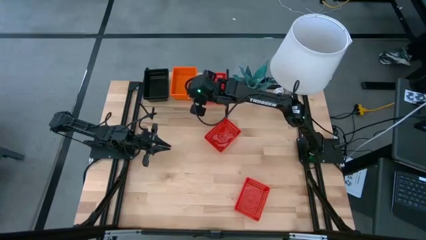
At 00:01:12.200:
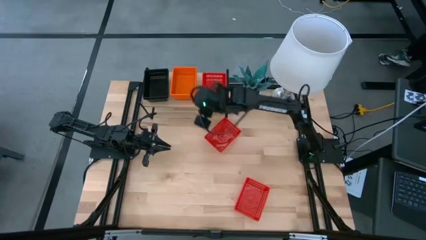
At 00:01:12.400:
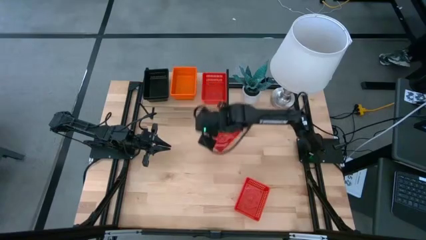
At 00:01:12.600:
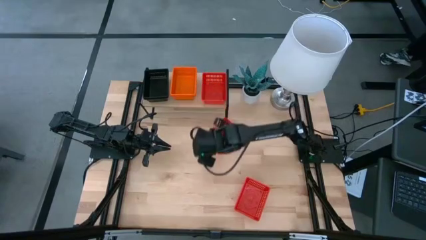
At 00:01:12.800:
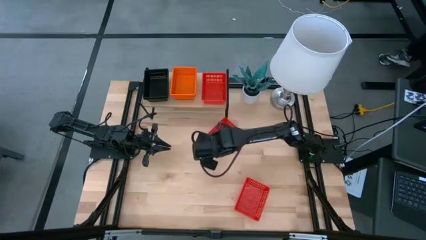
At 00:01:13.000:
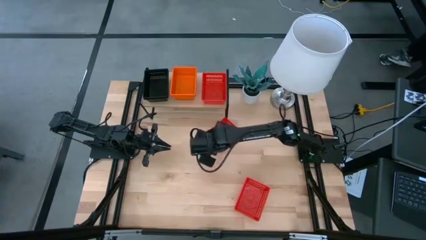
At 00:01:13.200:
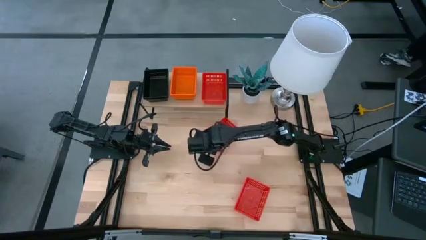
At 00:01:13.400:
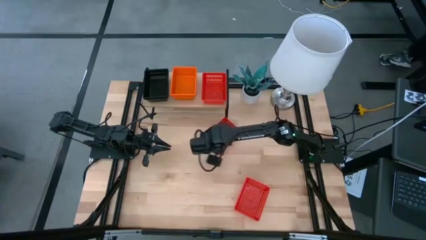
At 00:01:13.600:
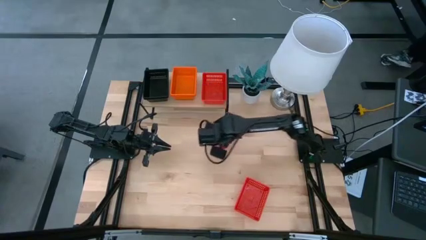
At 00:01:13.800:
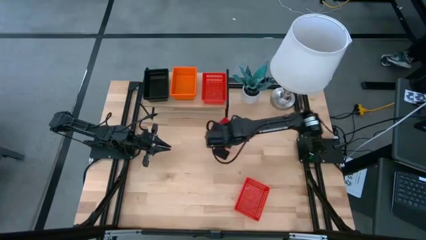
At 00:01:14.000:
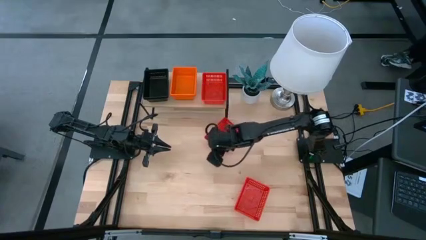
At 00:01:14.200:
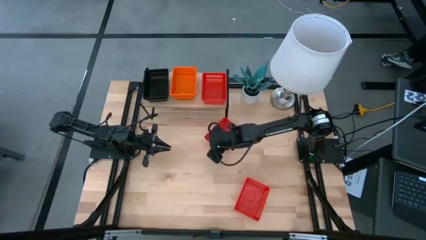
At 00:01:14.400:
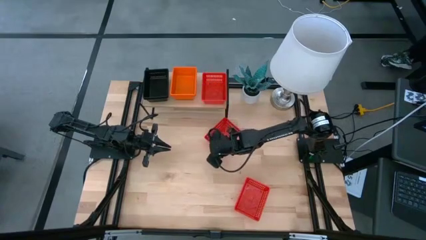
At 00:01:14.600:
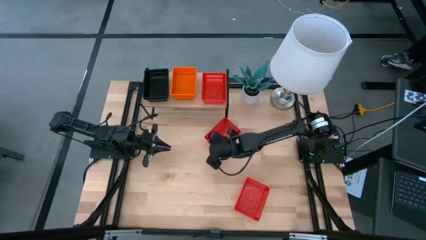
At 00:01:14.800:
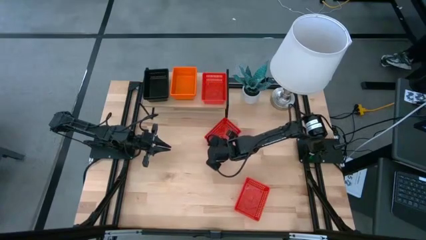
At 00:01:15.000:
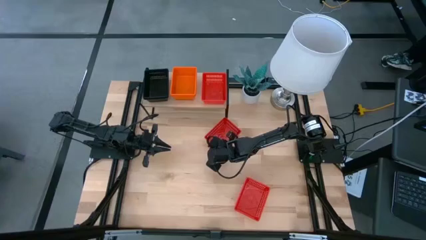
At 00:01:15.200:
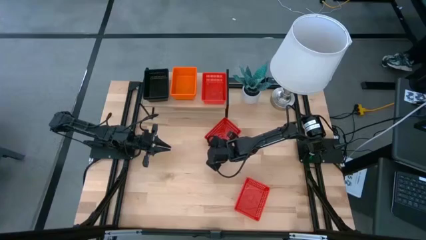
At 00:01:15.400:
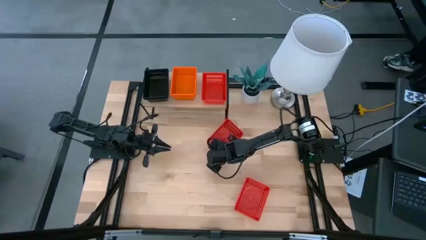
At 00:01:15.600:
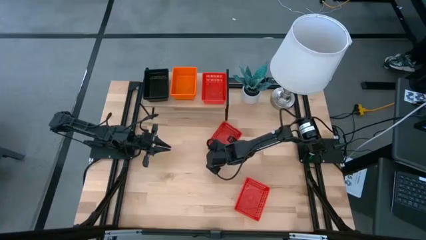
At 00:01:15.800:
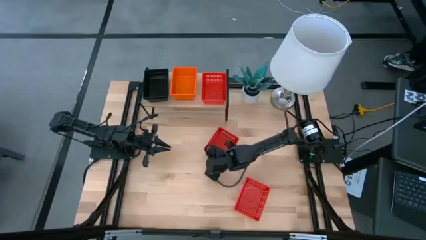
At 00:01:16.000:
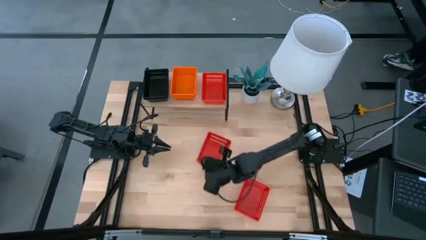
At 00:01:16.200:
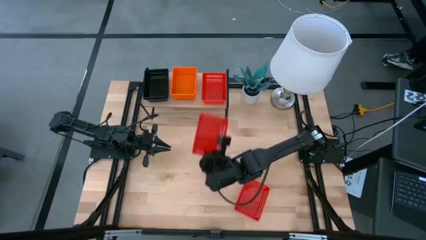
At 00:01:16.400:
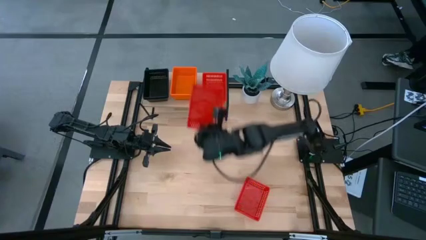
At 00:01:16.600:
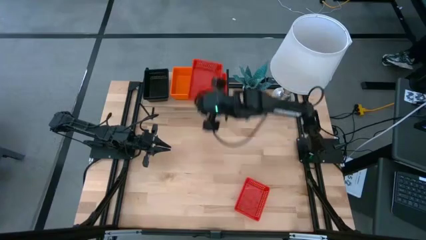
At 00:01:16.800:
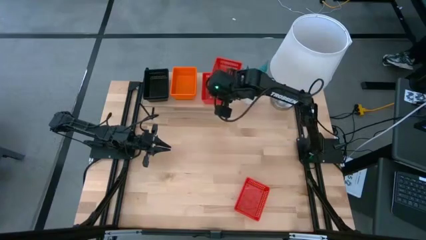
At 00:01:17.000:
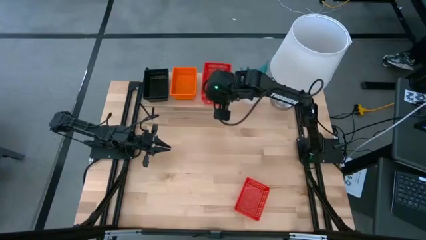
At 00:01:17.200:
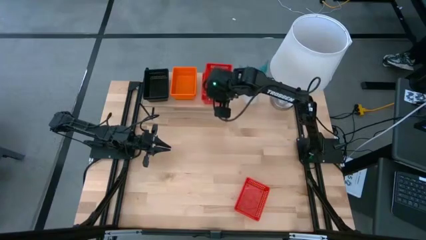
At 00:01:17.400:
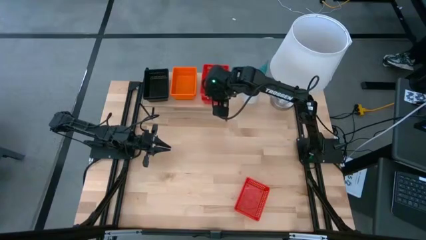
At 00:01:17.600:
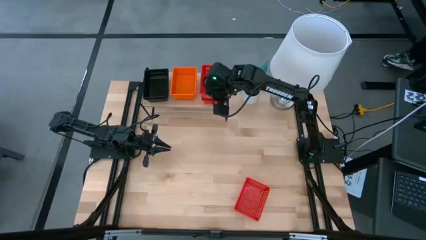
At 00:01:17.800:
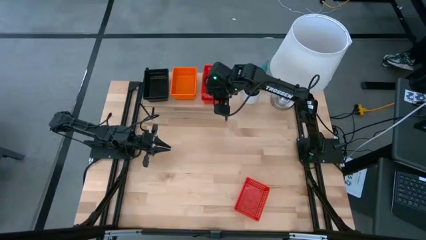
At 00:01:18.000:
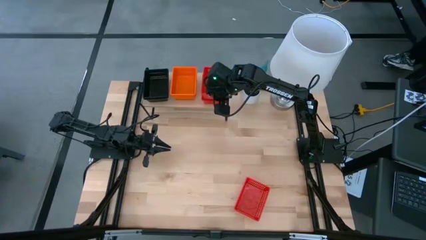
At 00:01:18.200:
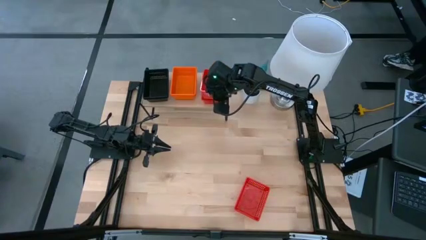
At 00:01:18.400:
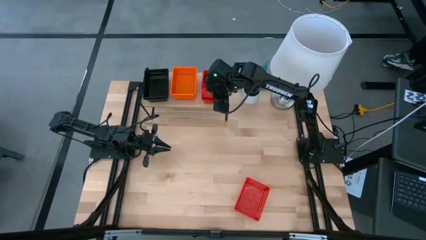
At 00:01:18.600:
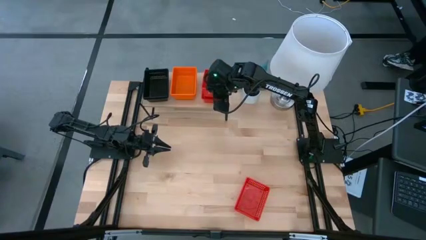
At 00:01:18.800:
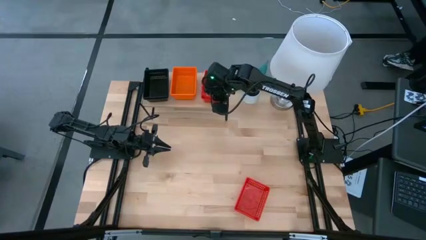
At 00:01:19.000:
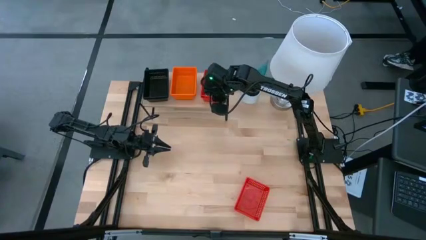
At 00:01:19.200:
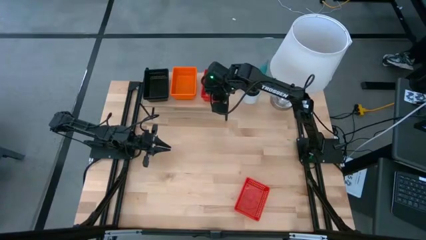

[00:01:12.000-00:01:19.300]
Task: Stack baskets on shelf by color
Stack the top red bin on top of the other red bin on the shelf

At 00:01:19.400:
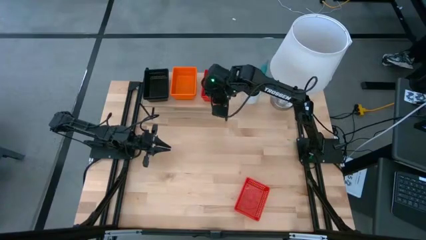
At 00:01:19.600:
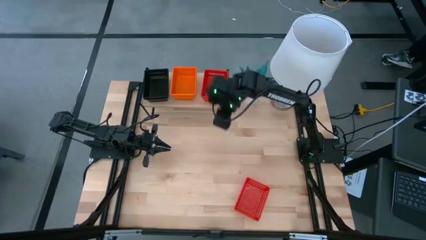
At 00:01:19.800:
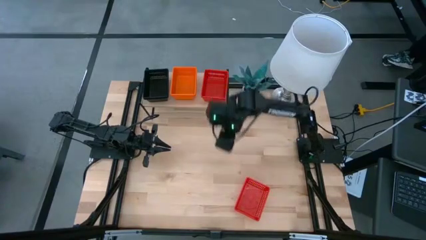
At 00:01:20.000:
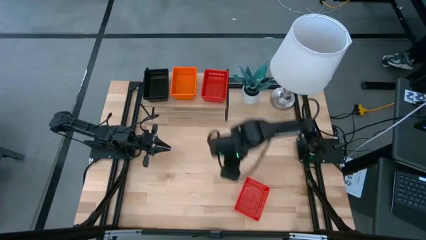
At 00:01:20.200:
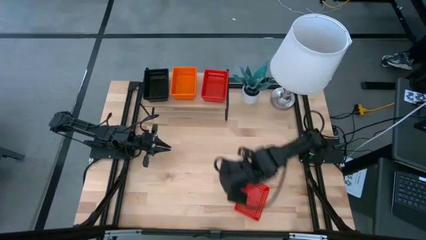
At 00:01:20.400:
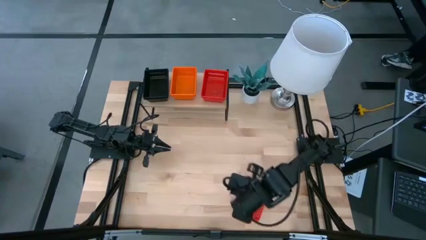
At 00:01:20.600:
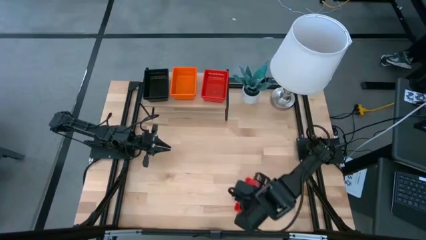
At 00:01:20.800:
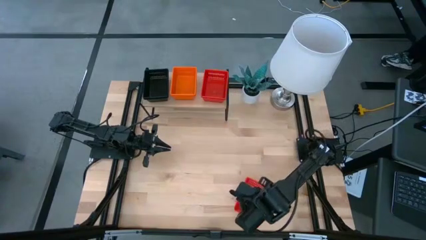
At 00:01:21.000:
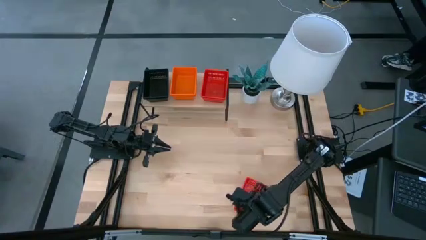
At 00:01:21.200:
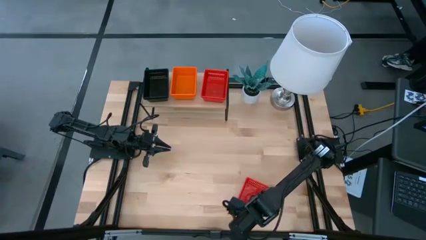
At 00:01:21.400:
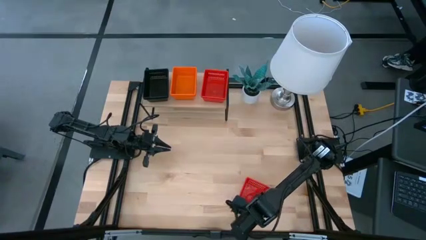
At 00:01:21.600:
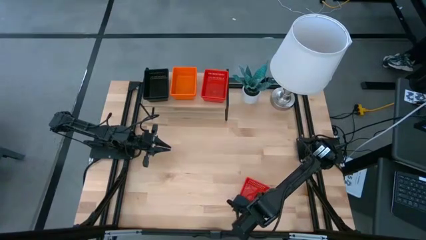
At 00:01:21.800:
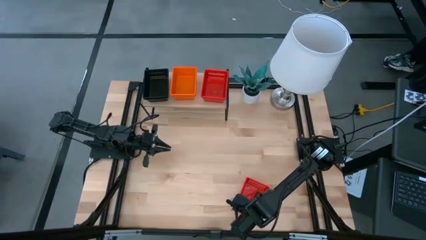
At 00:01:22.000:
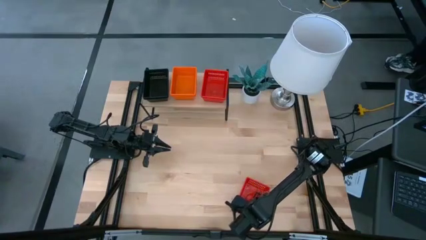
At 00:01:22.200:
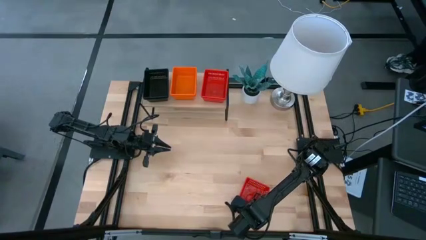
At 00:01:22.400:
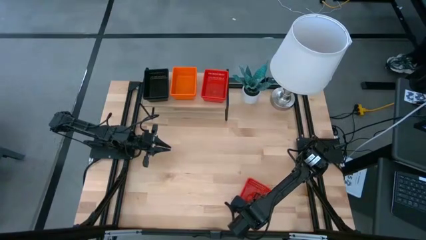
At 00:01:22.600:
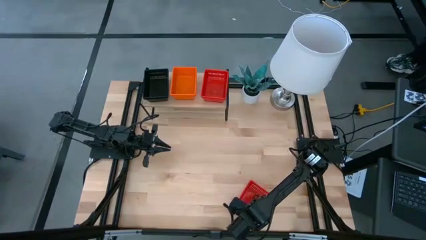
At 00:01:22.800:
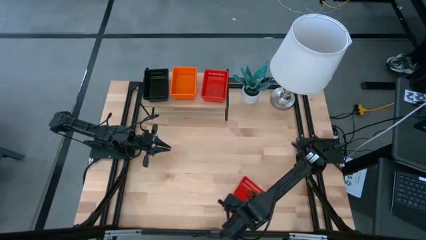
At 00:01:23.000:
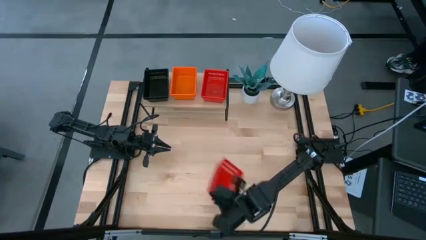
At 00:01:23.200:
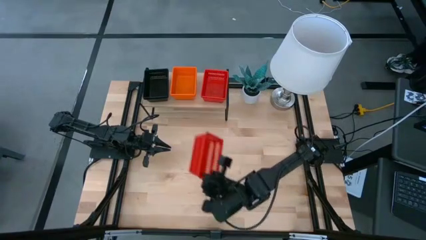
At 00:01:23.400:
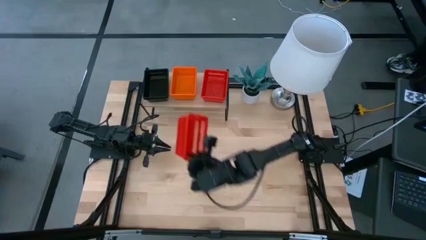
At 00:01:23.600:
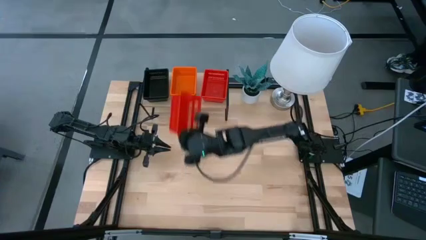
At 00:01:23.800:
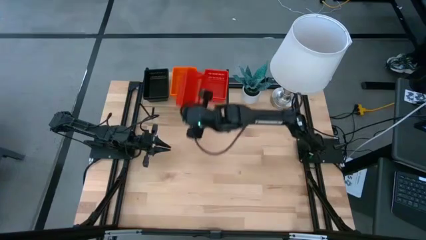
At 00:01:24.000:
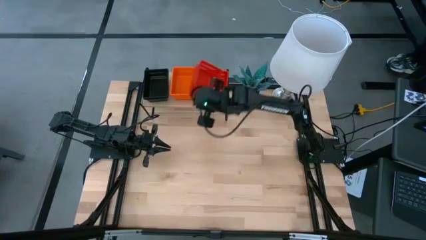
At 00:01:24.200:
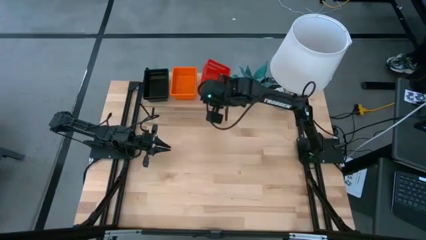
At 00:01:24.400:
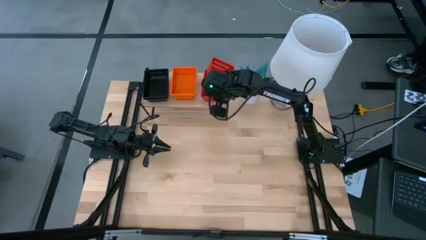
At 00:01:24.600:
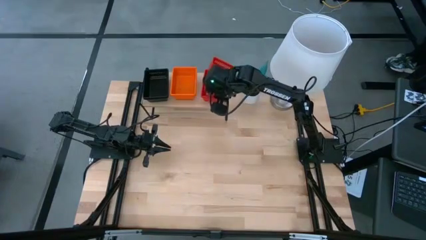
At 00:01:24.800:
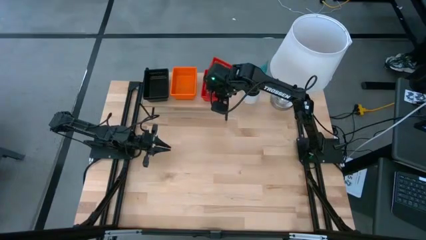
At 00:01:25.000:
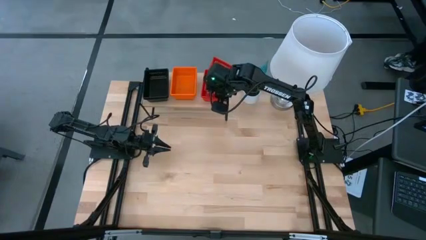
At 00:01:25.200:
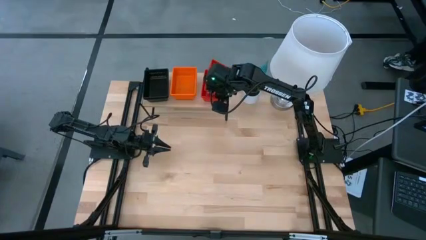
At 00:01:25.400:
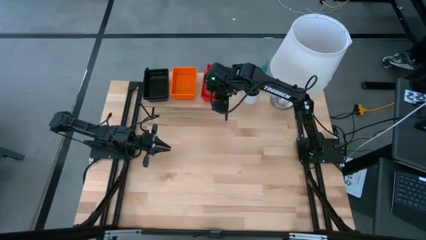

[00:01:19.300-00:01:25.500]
Stack the red bin on top of the other stacked red bins on the shelf
